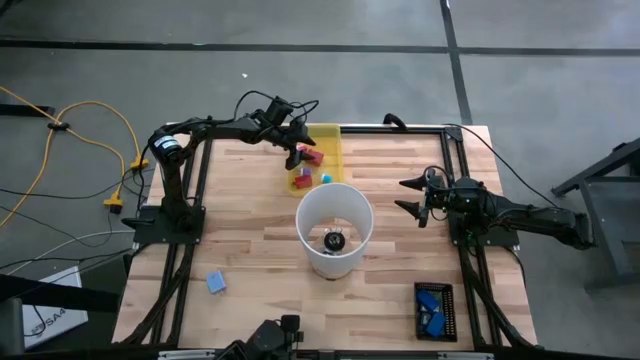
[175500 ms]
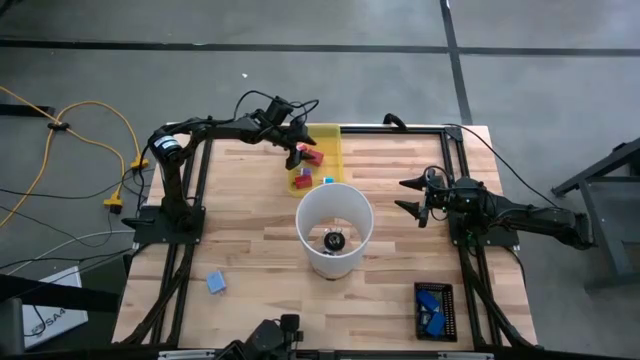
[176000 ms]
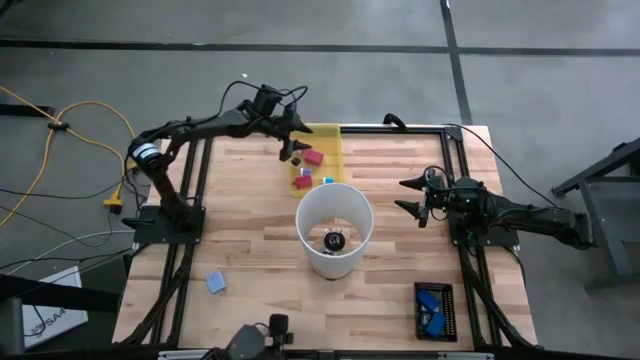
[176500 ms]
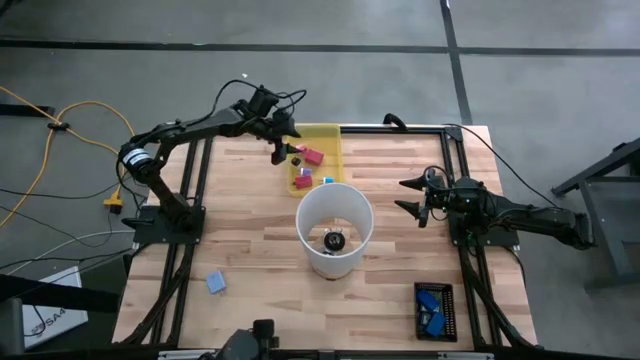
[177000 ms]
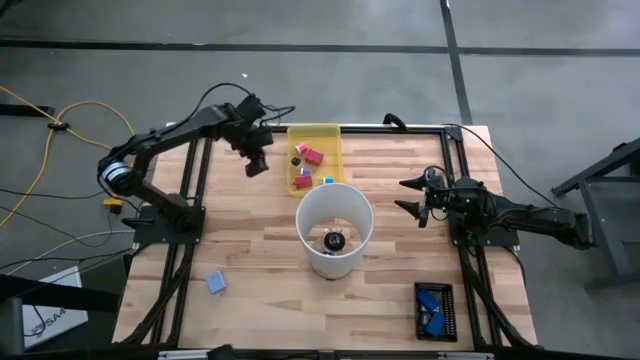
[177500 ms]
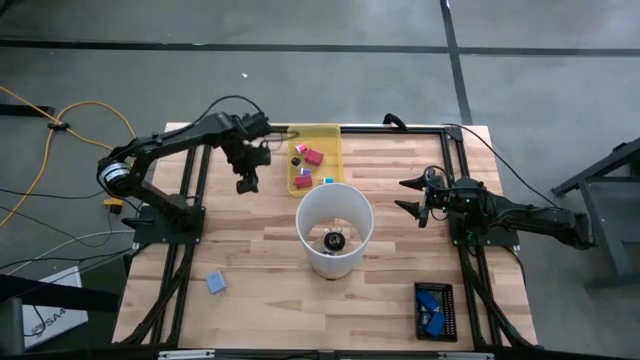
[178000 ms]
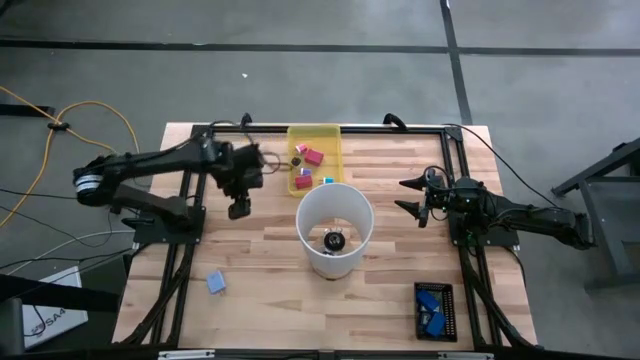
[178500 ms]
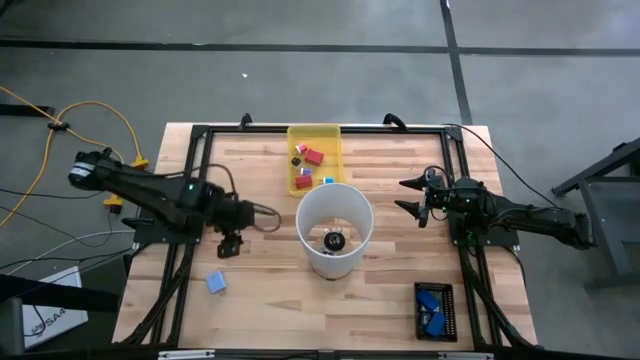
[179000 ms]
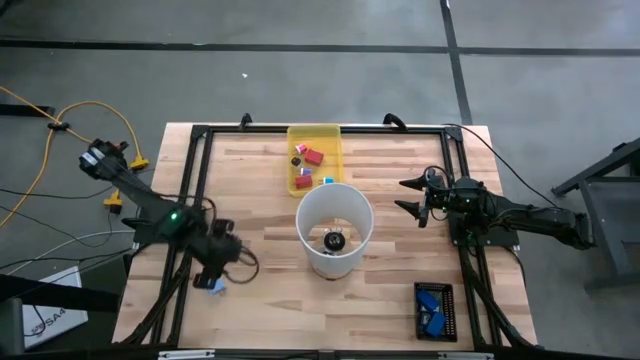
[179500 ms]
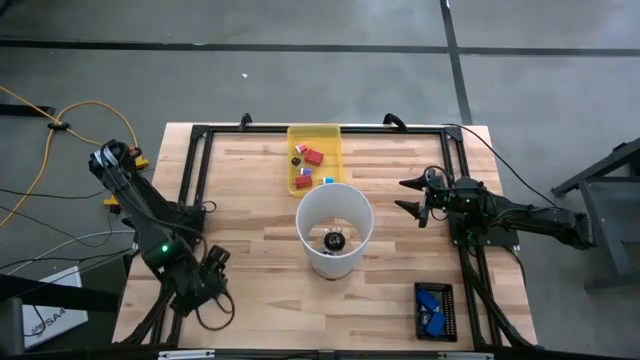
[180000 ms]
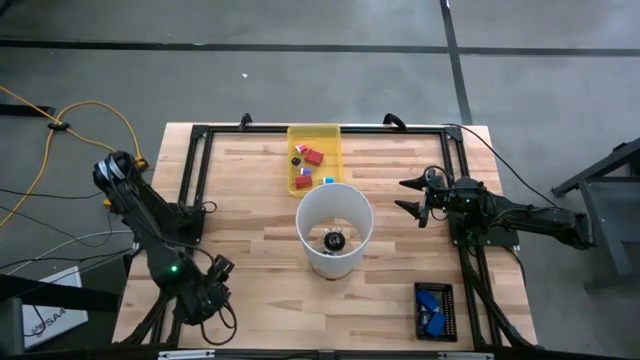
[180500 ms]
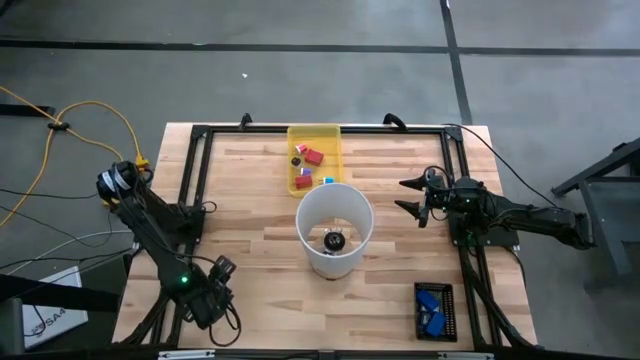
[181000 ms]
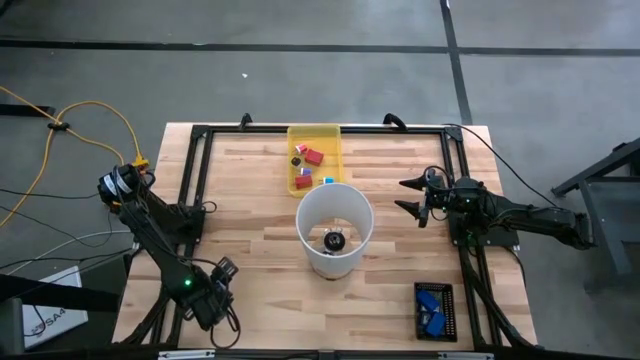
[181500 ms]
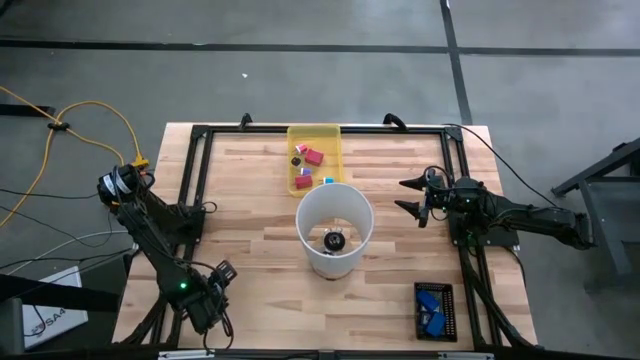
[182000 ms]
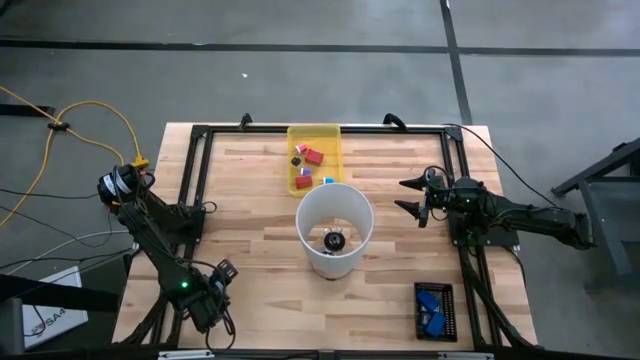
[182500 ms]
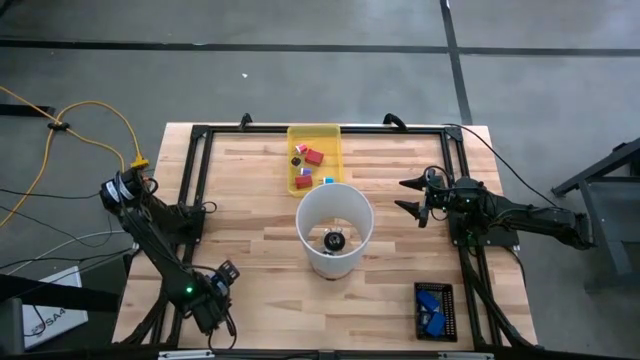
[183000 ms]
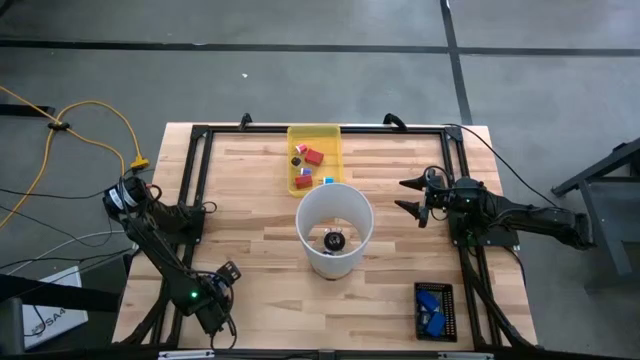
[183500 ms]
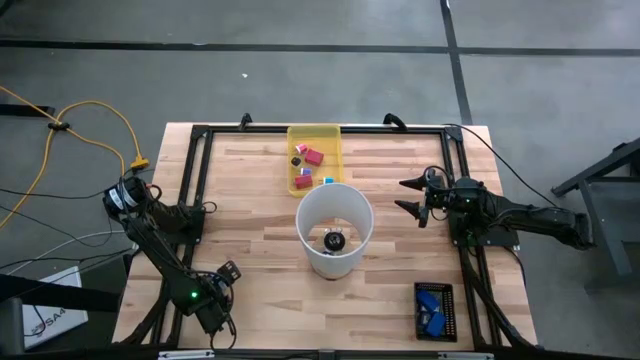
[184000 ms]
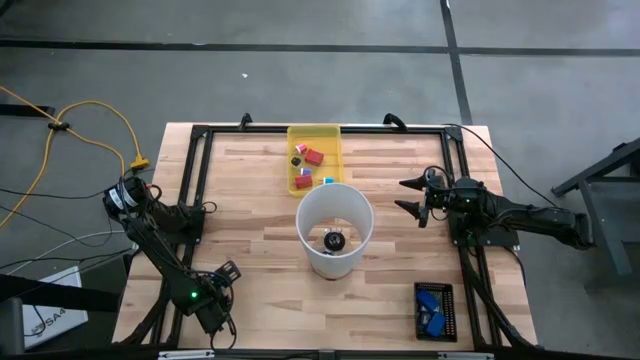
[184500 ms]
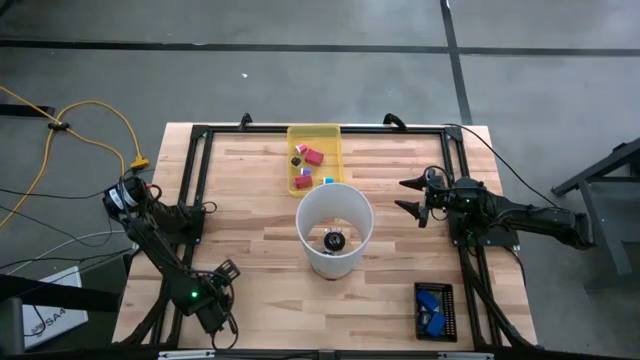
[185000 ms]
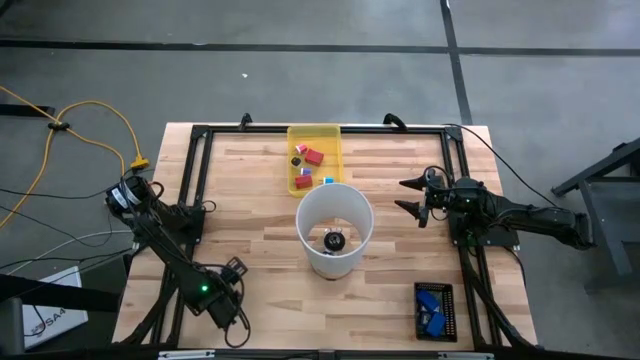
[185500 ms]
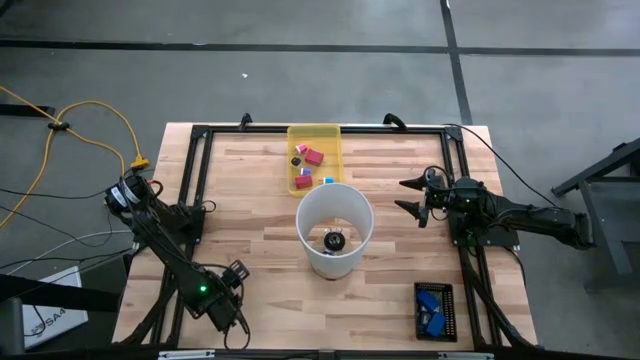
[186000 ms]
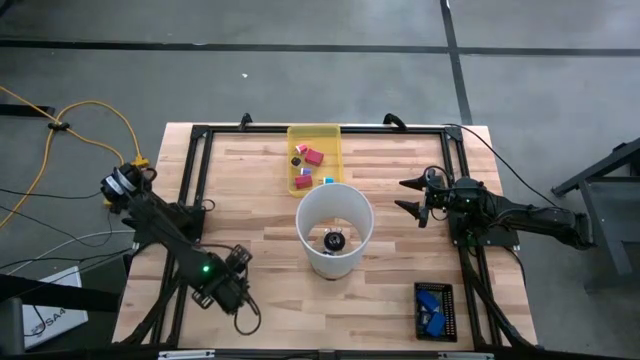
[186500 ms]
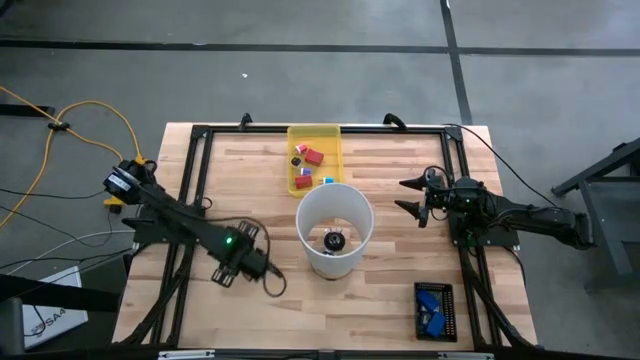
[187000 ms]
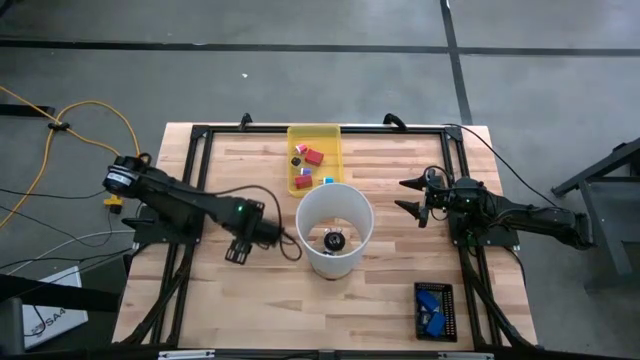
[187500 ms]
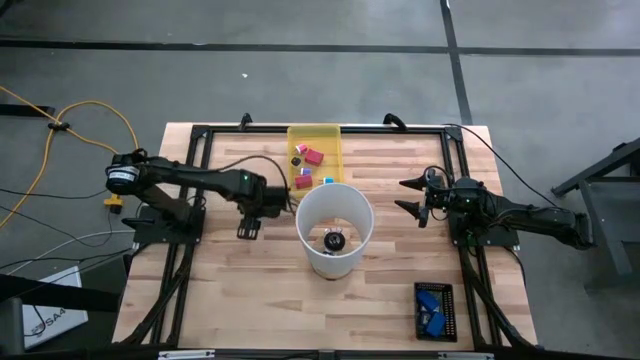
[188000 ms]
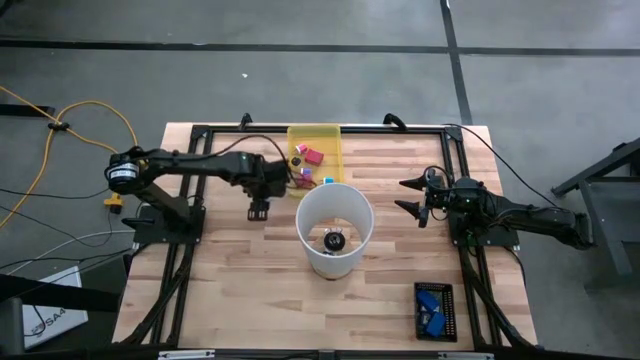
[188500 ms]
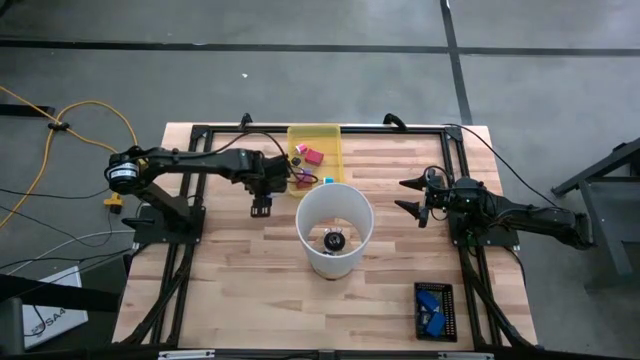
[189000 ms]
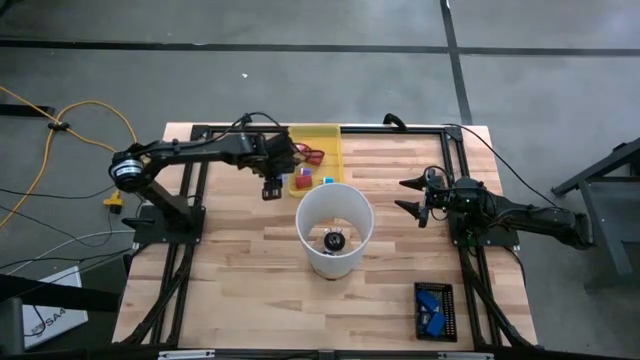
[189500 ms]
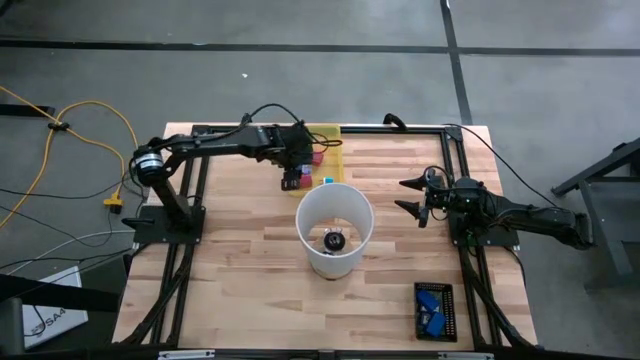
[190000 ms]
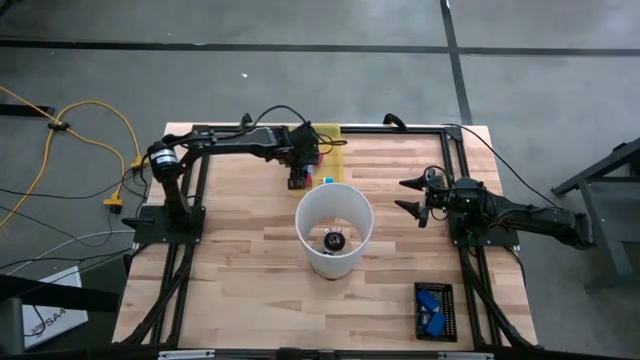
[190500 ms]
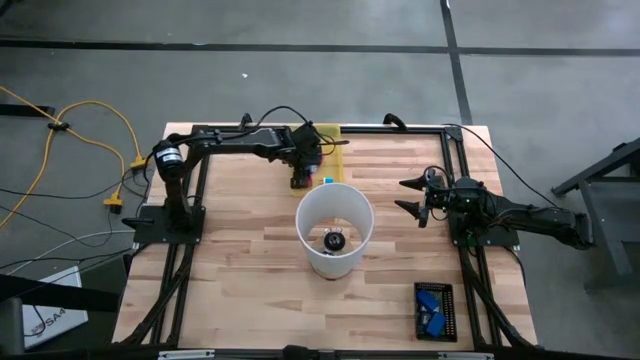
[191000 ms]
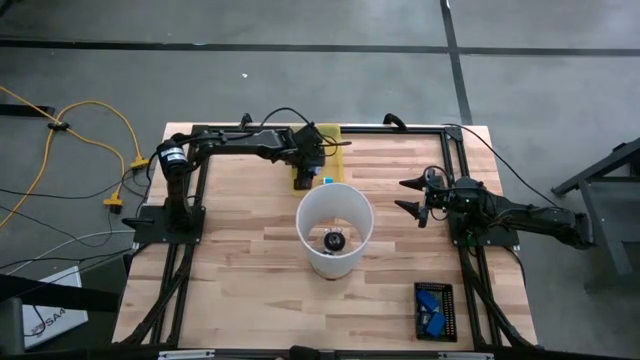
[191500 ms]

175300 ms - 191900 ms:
Task: Pick & Place Office items
Put the blue charger adapter into the yellow bin
